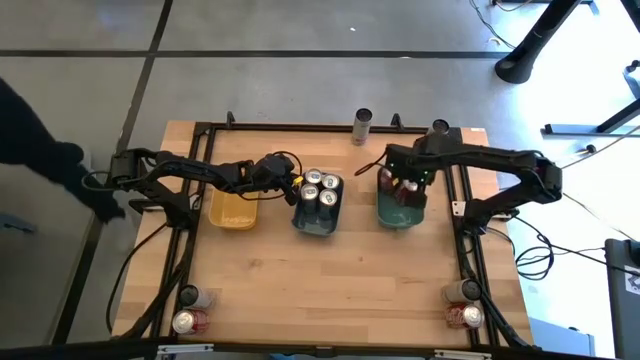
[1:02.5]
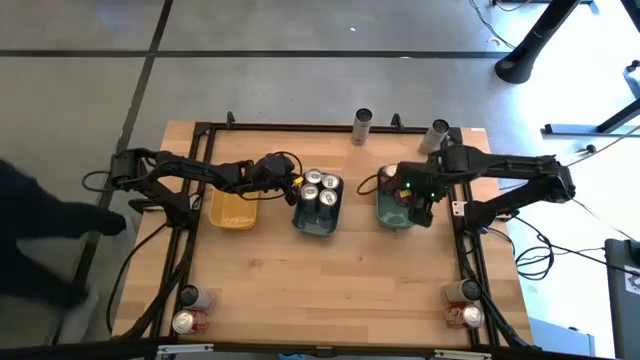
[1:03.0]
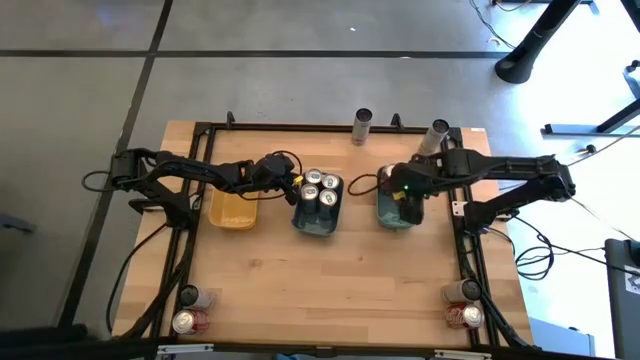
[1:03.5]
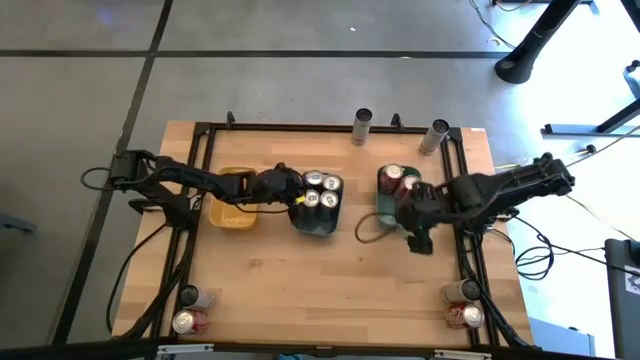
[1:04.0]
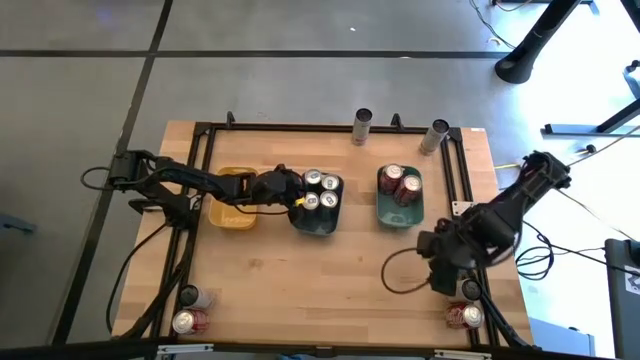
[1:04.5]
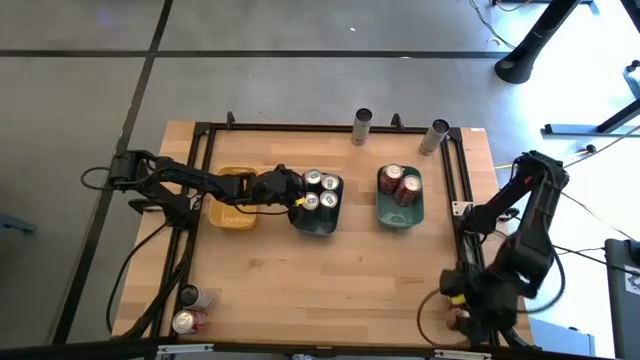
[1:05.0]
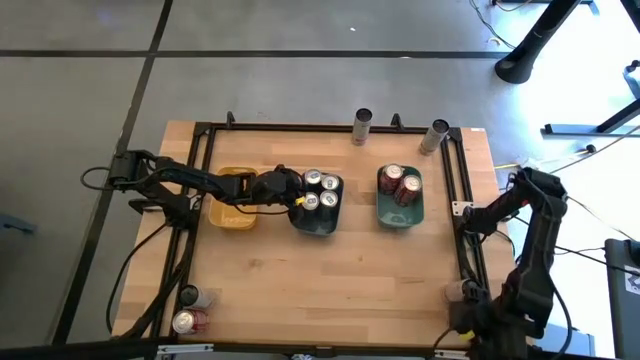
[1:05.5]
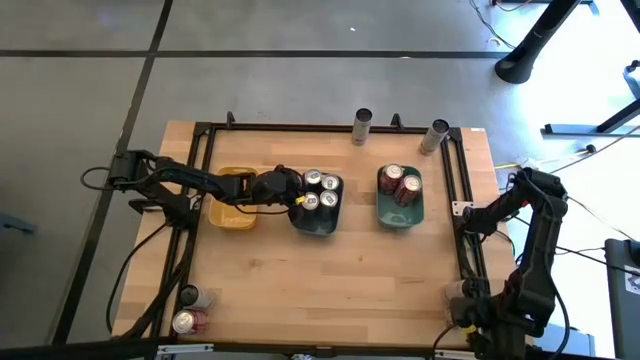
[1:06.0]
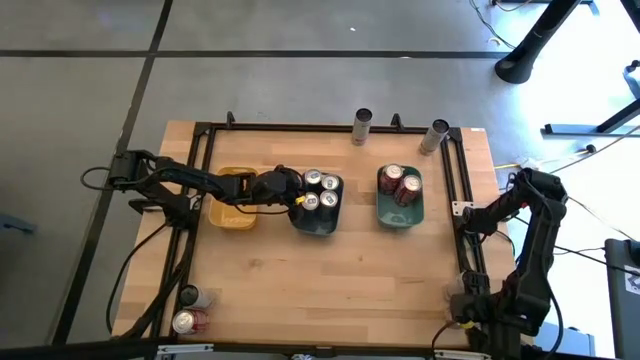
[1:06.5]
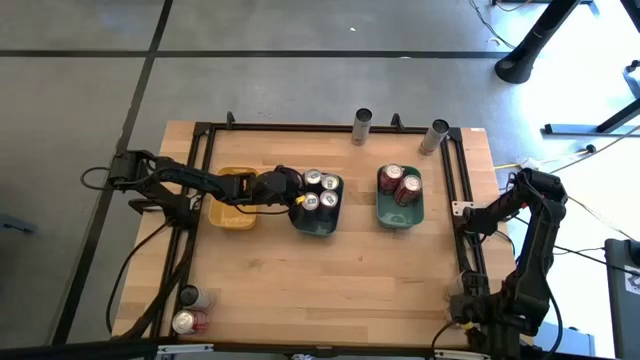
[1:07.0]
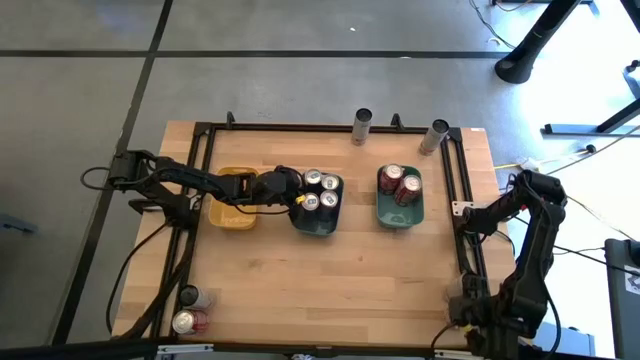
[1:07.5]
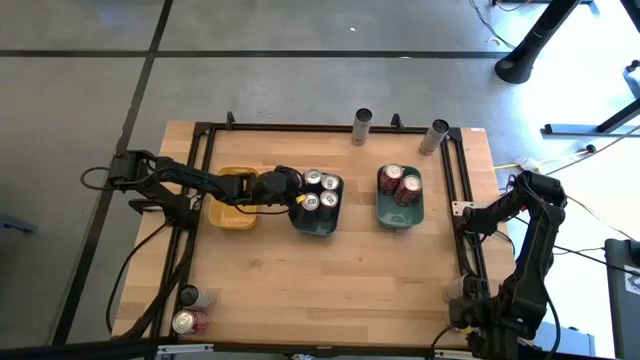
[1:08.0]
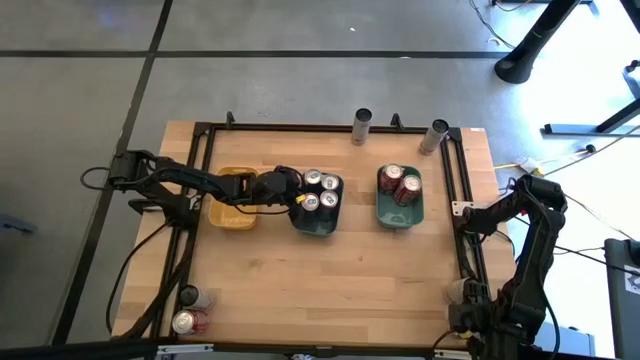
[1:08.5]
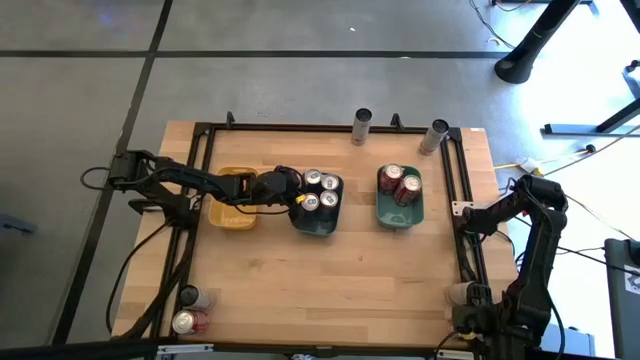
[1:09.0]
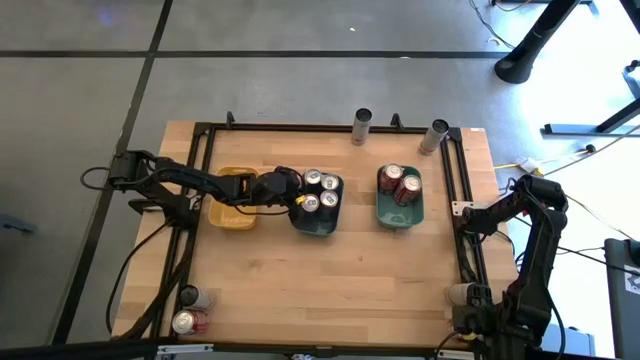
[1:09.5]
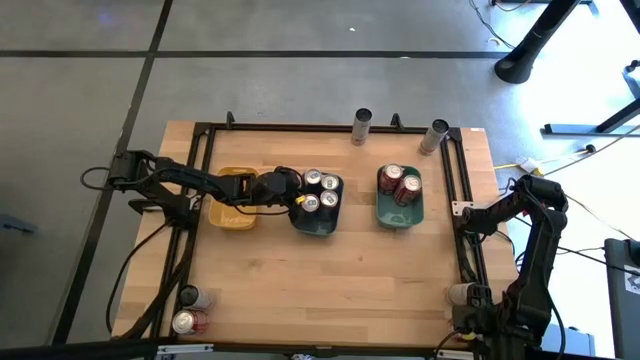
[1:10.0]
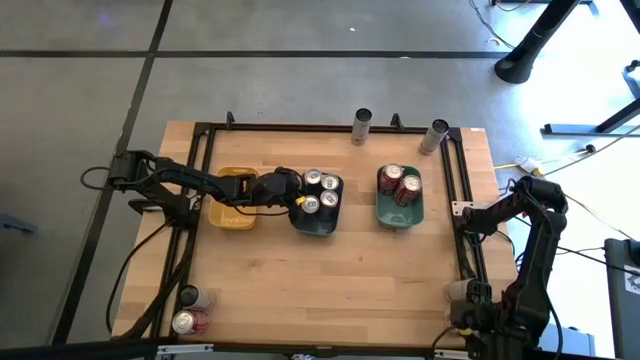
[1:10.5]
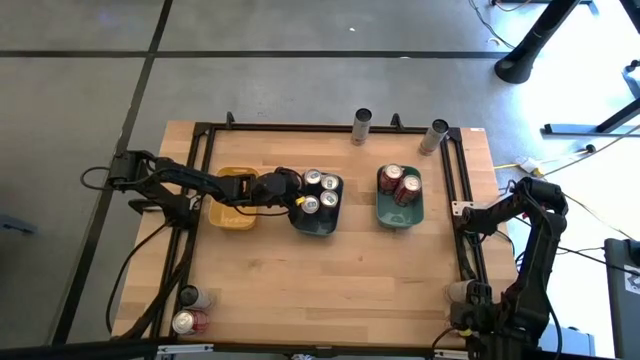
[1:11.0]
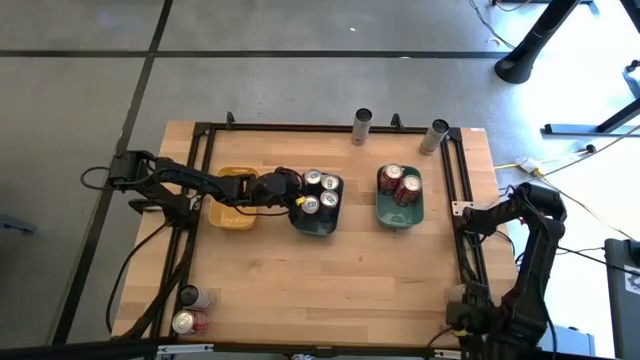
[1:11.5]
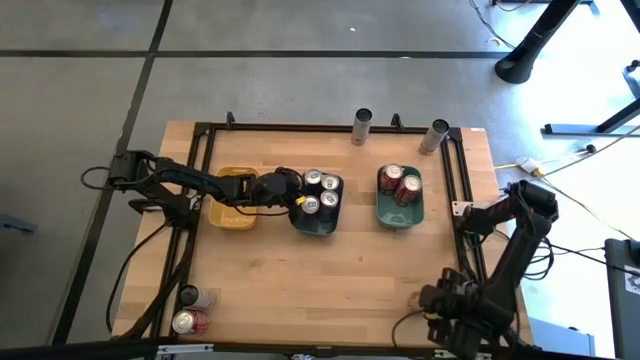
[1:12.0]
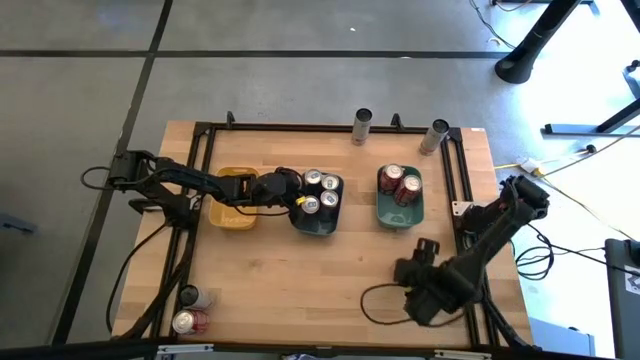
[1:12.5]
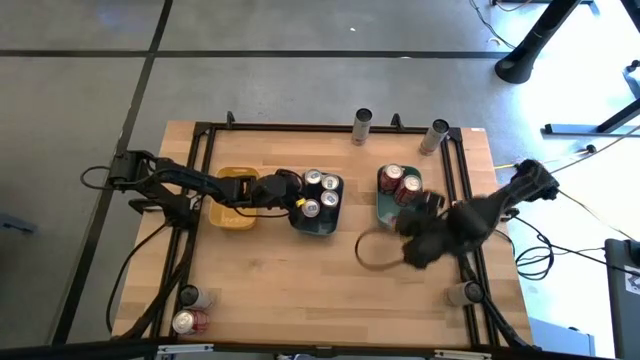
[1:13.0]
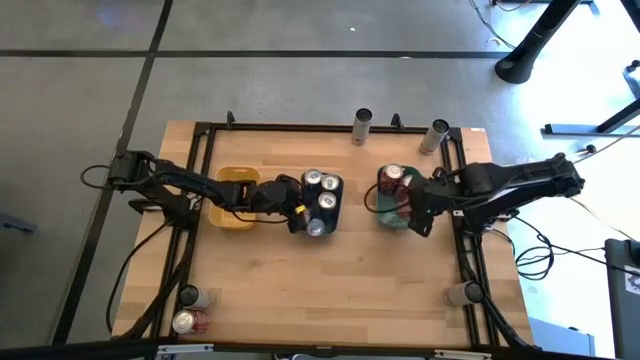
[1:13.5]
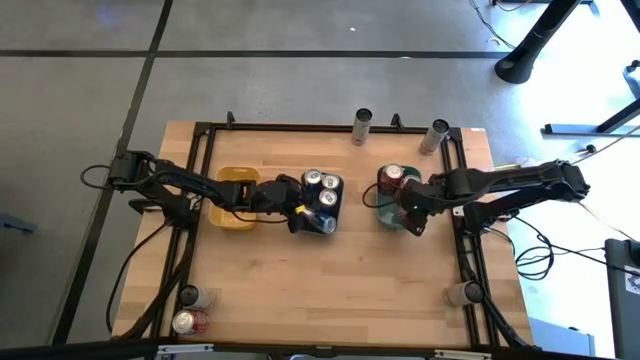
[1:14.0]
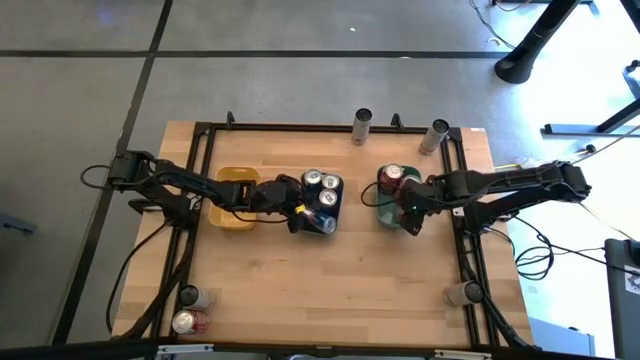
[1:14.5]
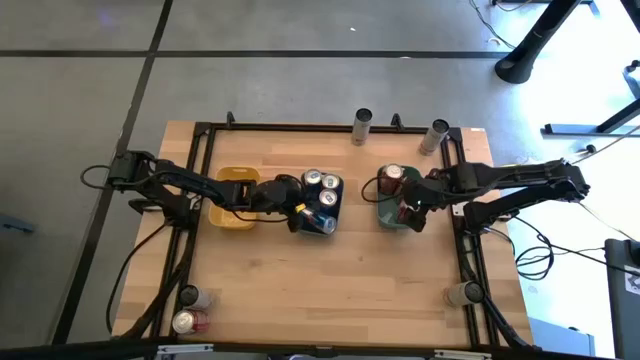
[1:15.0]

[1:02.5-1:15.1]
Task: Sort soda cans
Put the red soda can into green bin

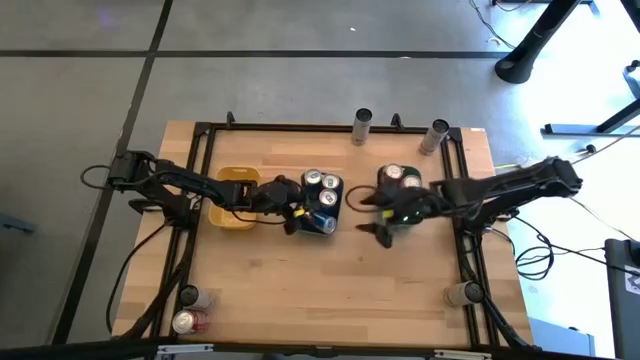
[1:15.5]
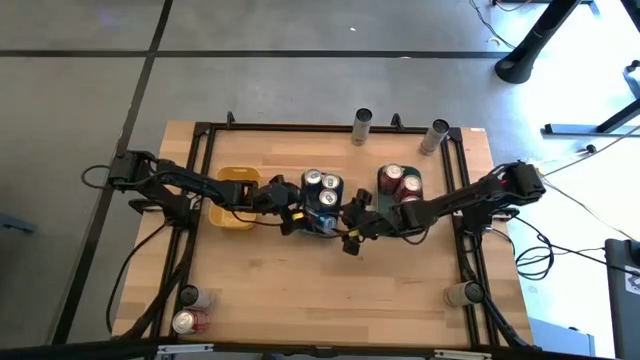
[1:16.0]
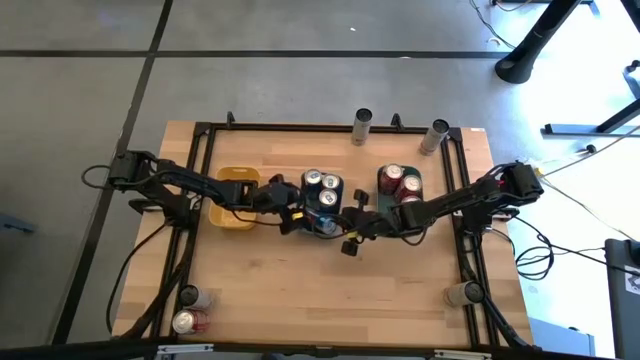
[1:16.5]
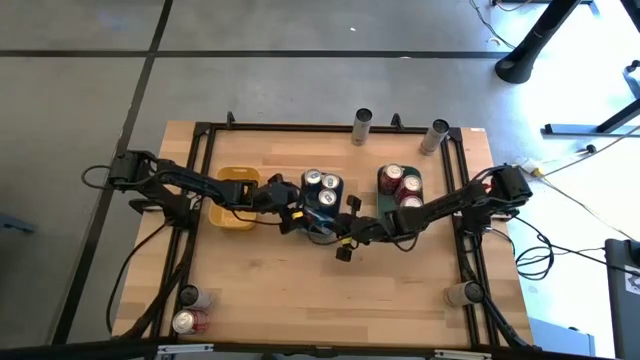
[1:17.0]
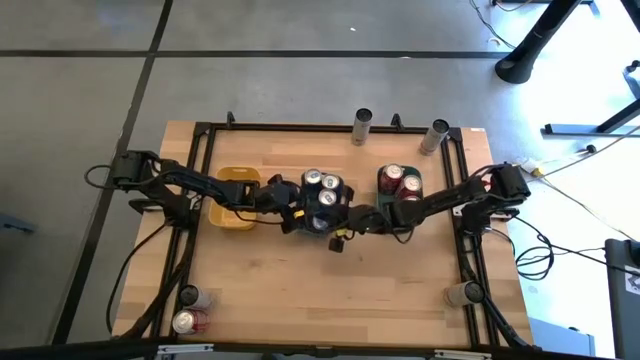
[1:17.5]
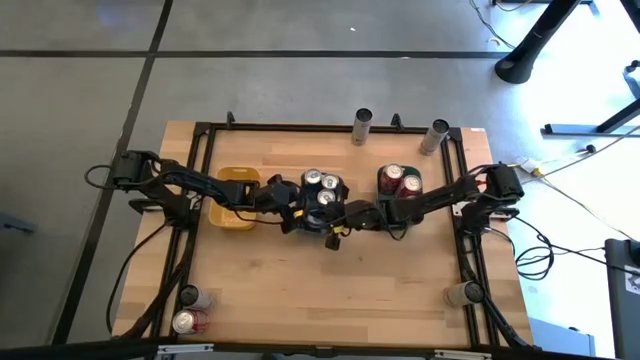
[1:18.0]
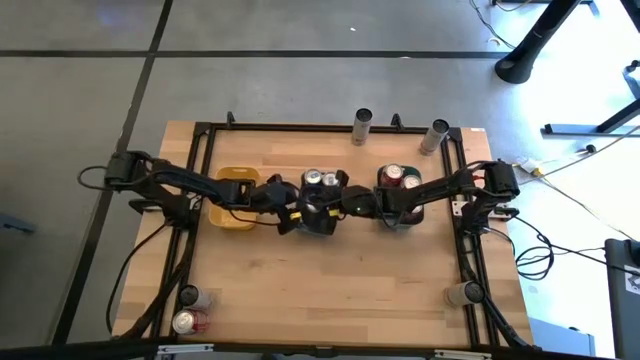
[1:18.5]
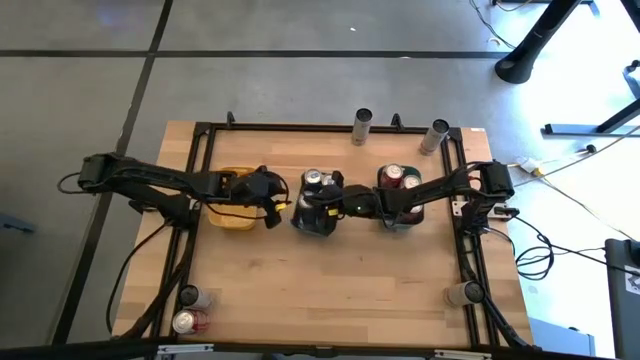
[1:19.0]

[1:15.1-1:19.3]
Adjust the blue soda can in the bin

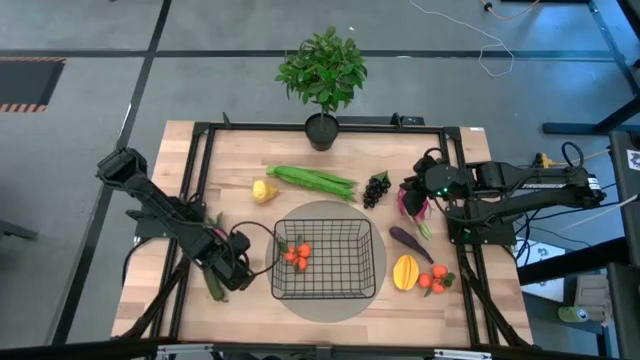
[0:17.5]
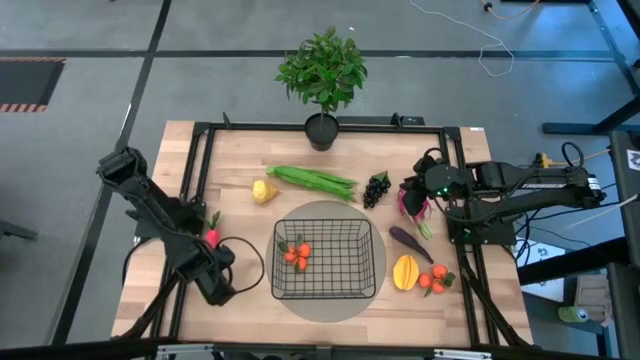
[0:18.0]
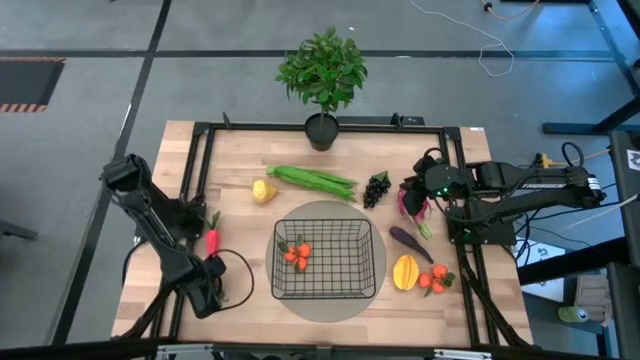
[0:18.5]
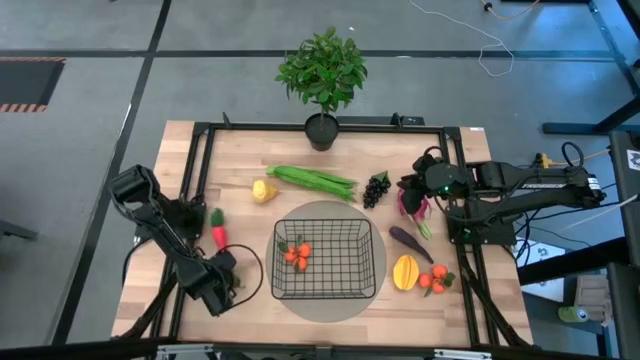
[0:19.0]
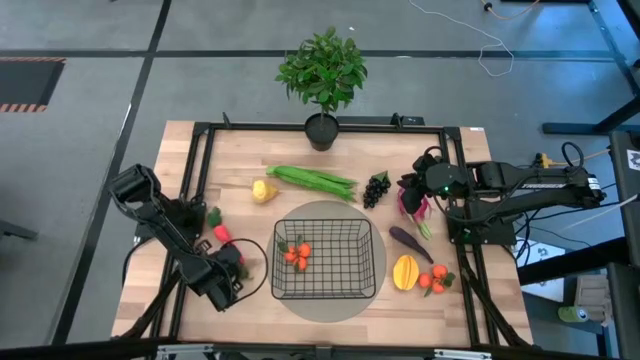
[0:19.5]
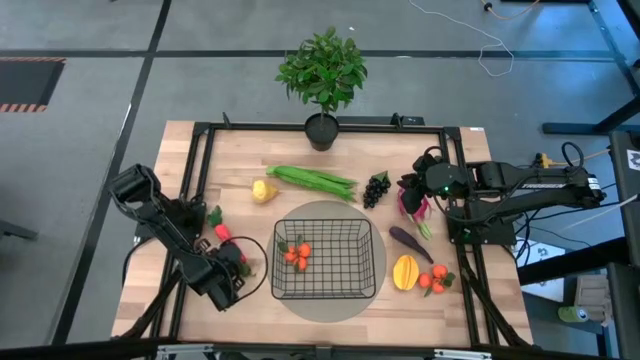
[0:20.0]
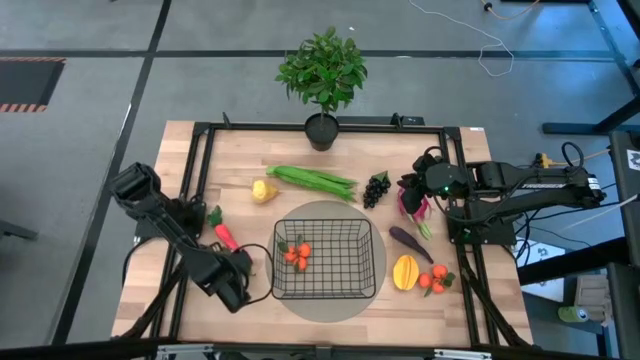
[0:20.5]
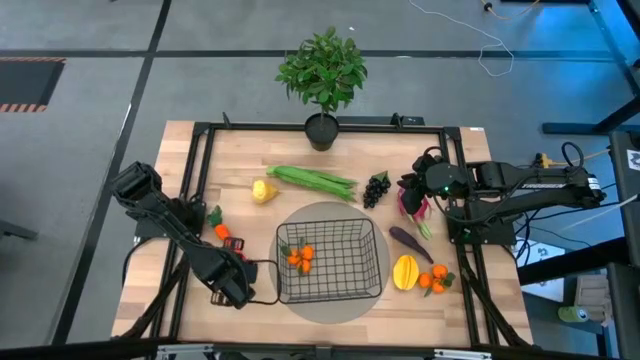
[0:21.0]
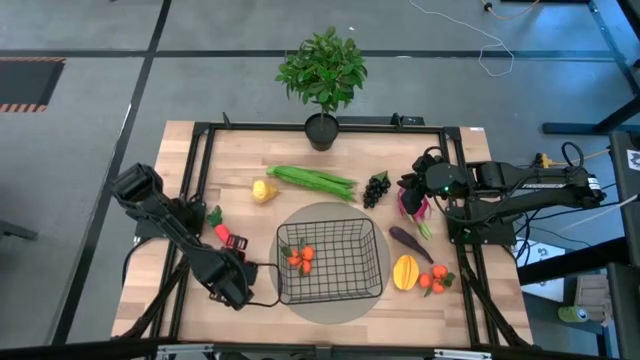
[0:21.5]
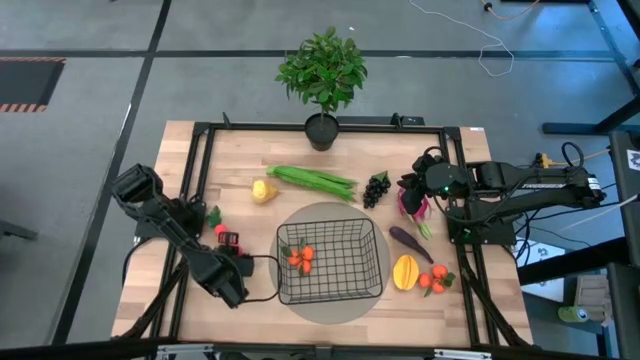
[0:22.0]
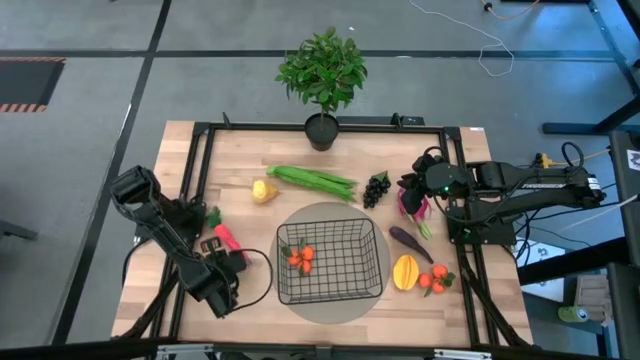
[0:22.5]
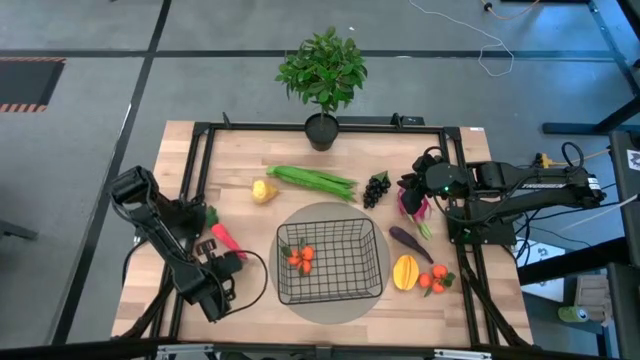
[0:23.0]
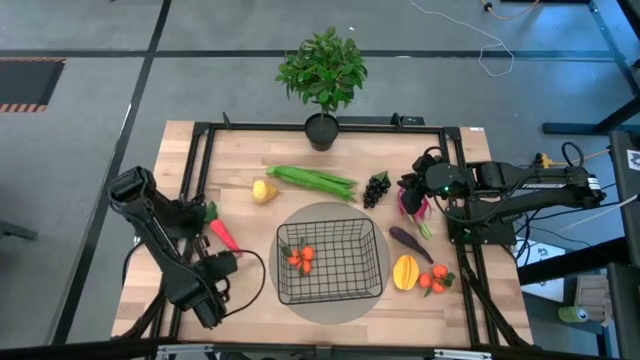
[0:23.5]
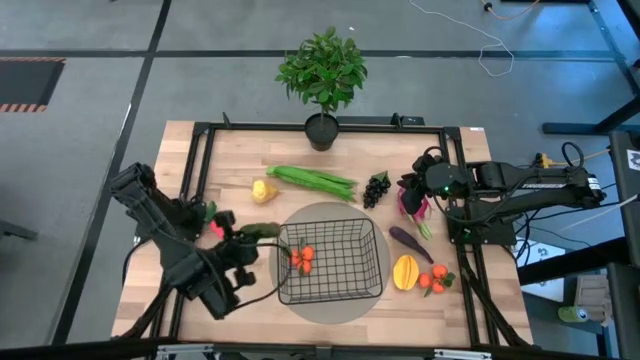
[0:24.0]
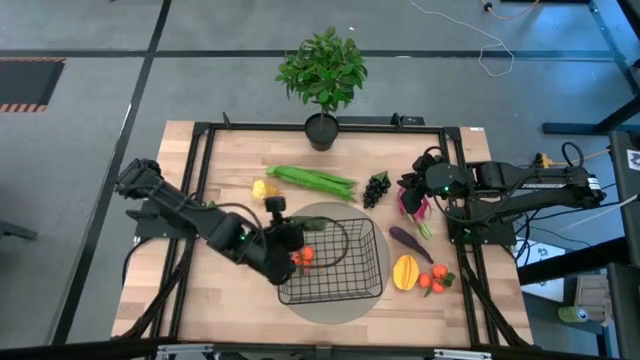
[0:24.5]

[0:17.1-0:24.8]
Task: Build produce basket
Put the chili pepper into the black wire basket
